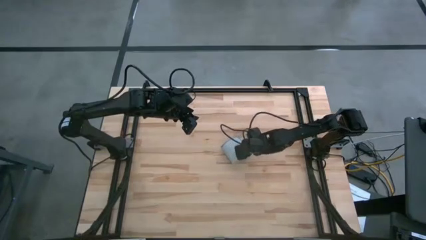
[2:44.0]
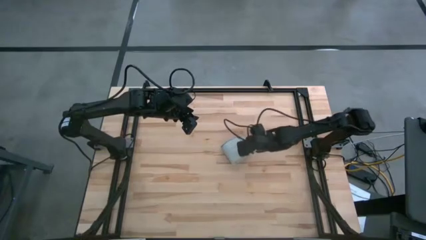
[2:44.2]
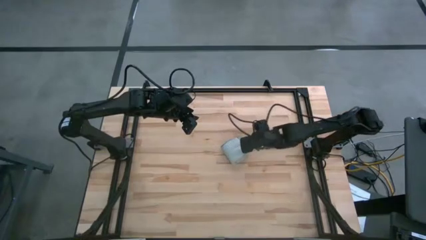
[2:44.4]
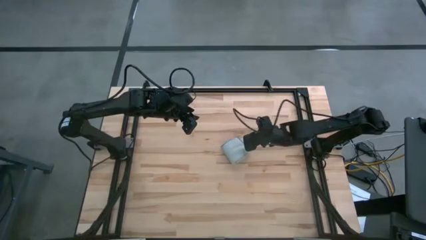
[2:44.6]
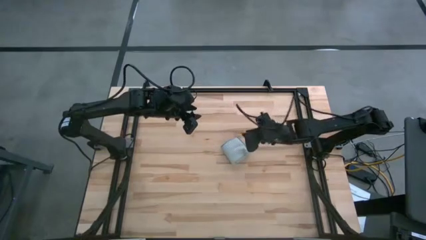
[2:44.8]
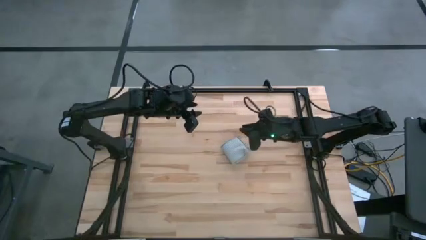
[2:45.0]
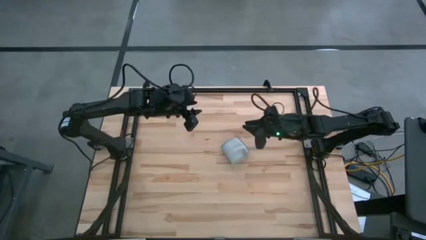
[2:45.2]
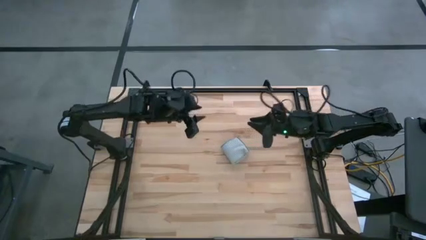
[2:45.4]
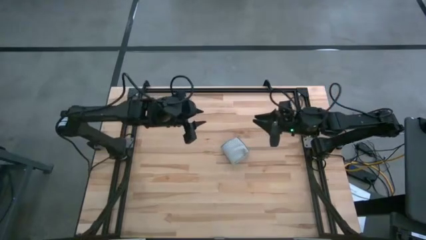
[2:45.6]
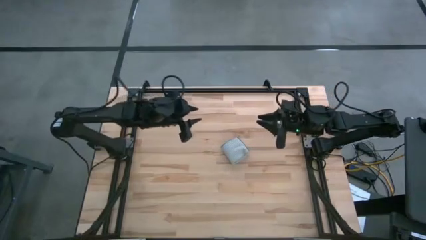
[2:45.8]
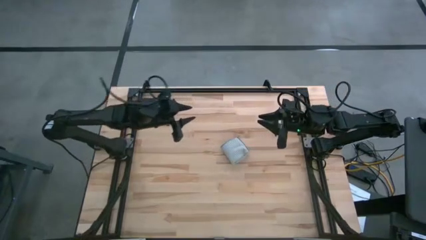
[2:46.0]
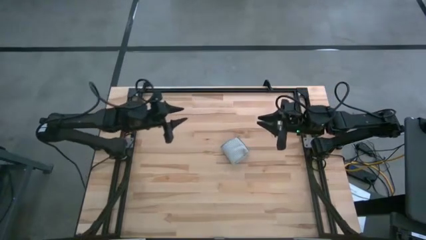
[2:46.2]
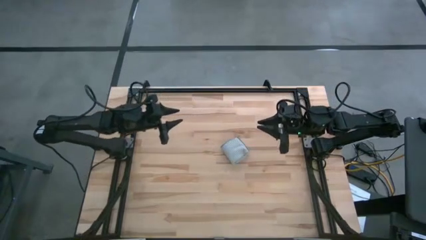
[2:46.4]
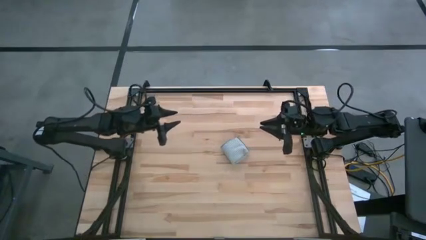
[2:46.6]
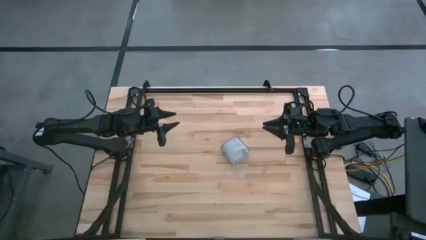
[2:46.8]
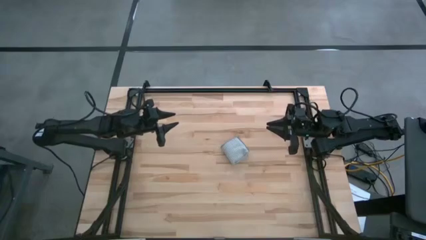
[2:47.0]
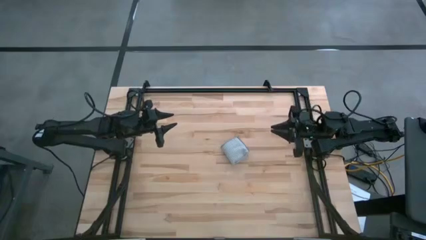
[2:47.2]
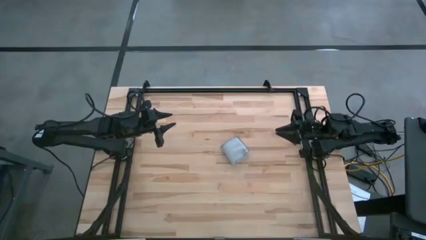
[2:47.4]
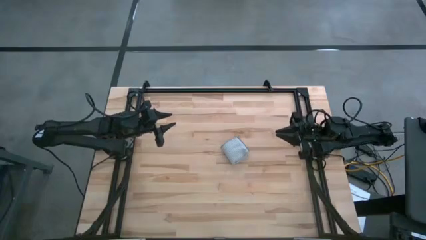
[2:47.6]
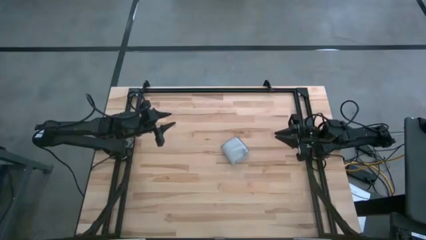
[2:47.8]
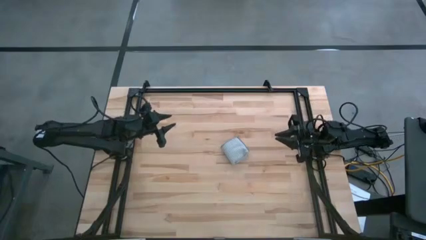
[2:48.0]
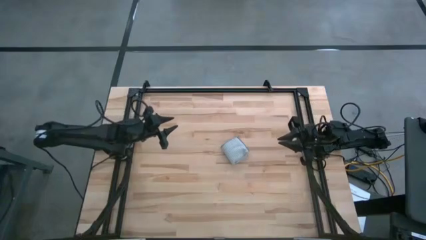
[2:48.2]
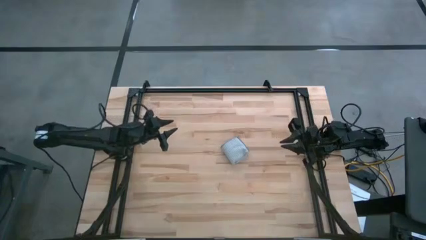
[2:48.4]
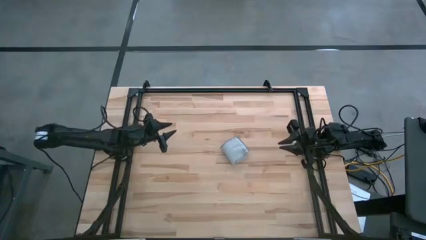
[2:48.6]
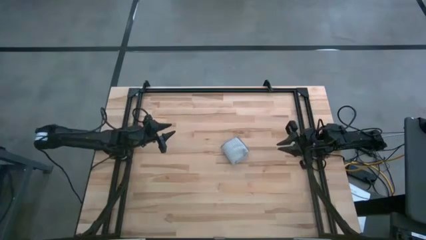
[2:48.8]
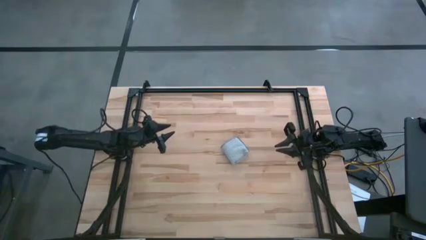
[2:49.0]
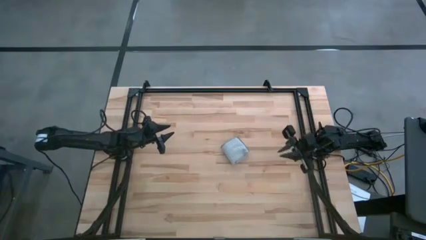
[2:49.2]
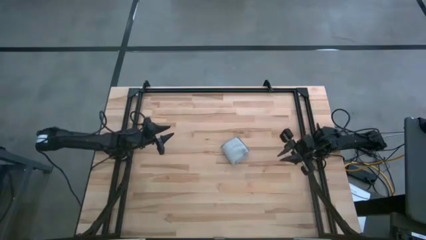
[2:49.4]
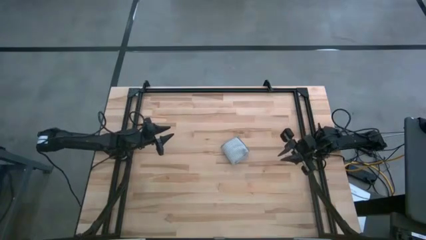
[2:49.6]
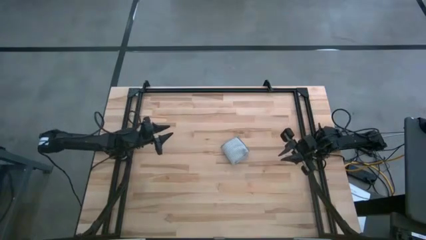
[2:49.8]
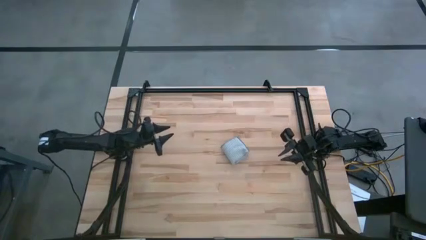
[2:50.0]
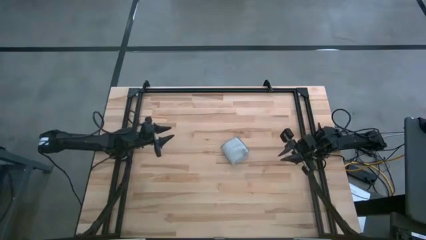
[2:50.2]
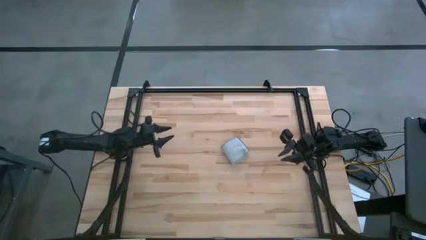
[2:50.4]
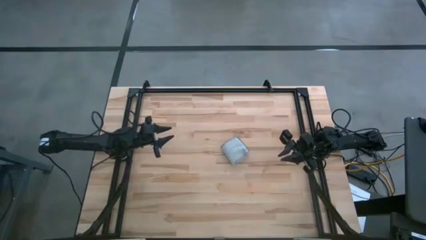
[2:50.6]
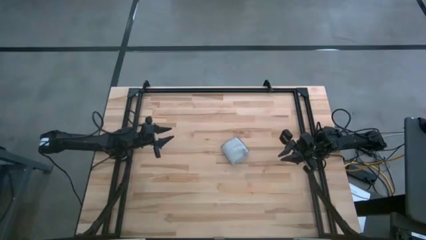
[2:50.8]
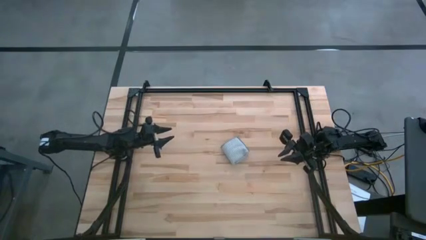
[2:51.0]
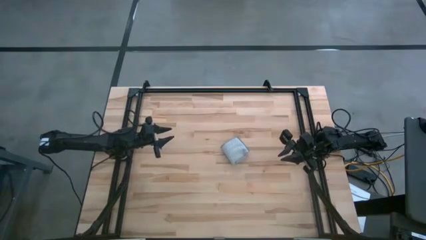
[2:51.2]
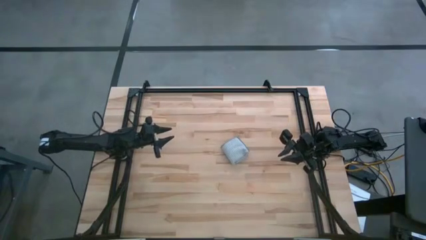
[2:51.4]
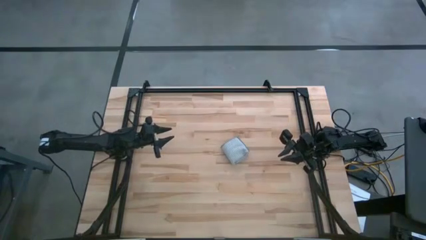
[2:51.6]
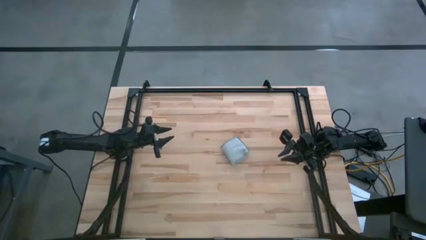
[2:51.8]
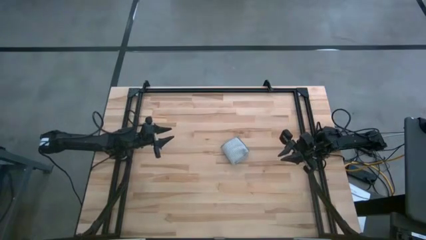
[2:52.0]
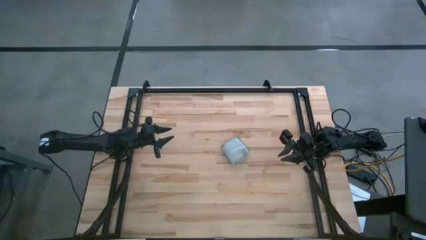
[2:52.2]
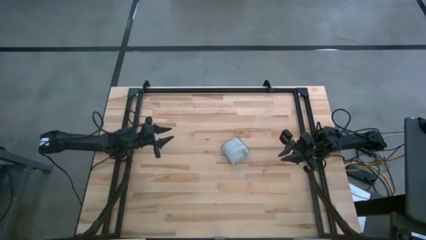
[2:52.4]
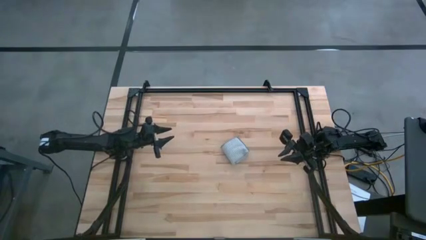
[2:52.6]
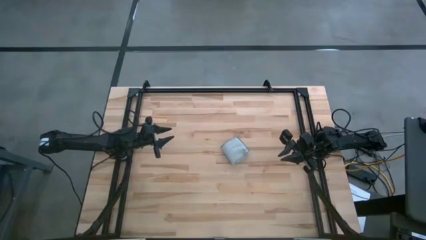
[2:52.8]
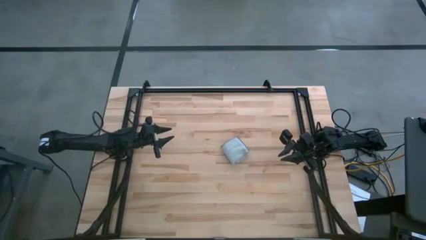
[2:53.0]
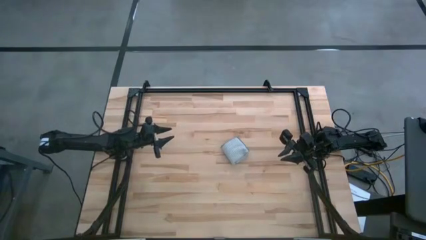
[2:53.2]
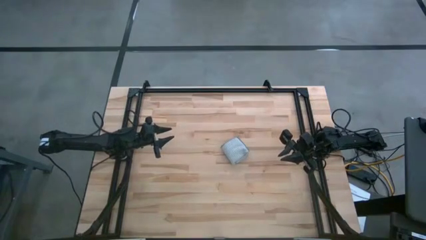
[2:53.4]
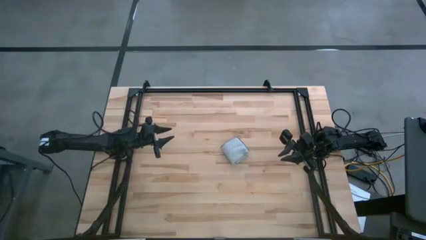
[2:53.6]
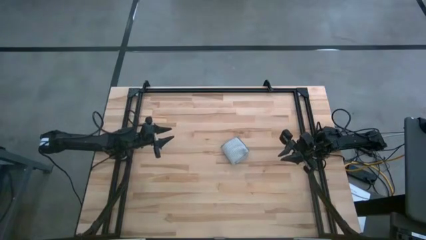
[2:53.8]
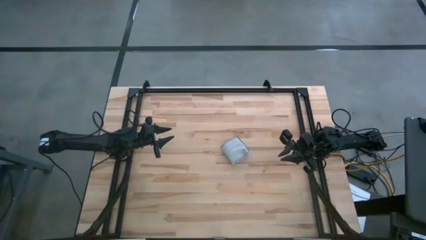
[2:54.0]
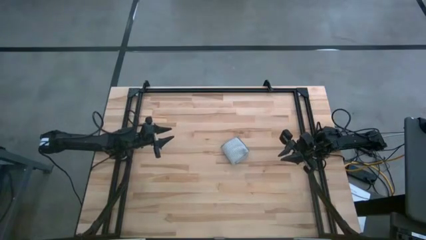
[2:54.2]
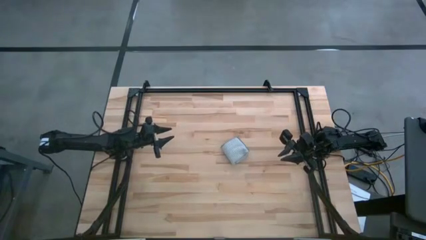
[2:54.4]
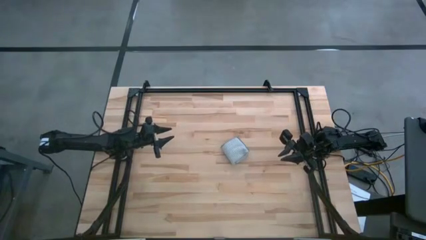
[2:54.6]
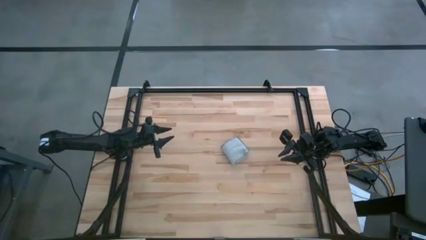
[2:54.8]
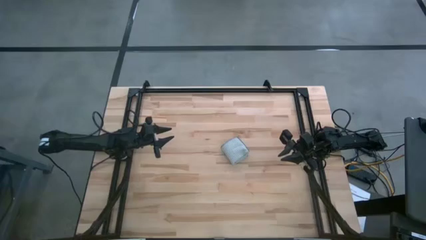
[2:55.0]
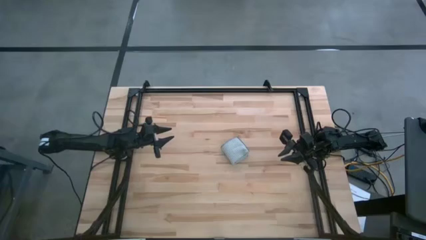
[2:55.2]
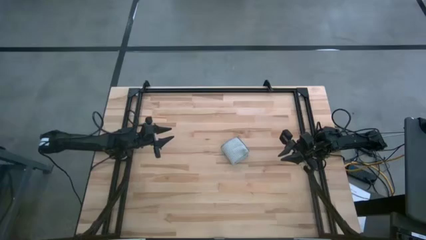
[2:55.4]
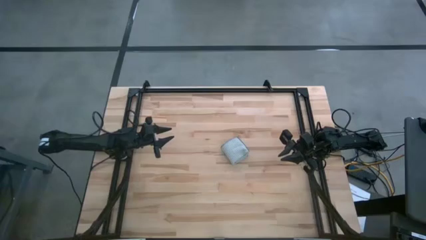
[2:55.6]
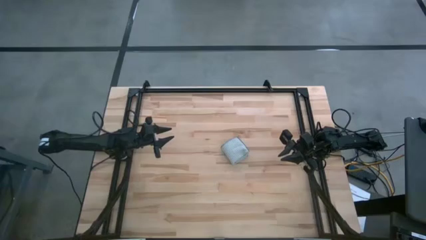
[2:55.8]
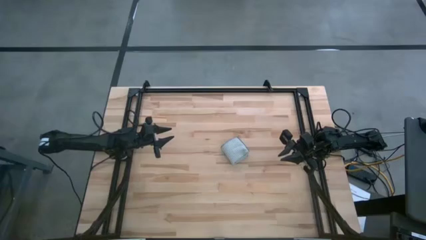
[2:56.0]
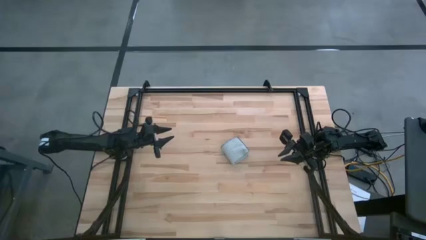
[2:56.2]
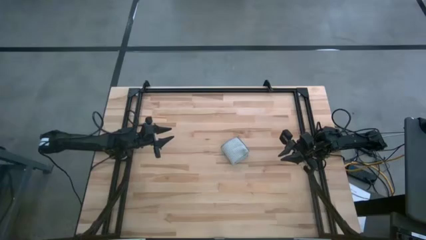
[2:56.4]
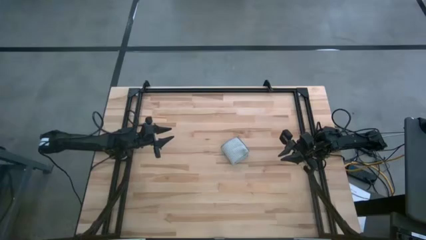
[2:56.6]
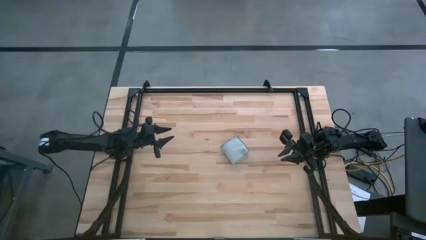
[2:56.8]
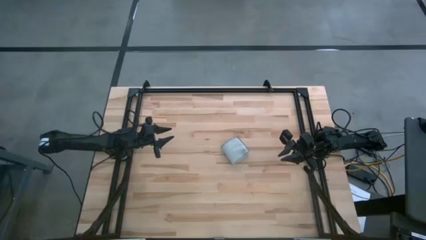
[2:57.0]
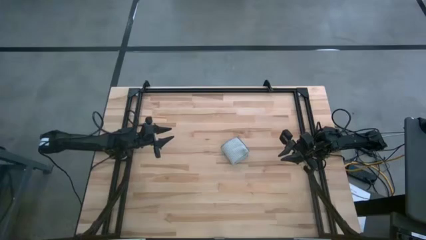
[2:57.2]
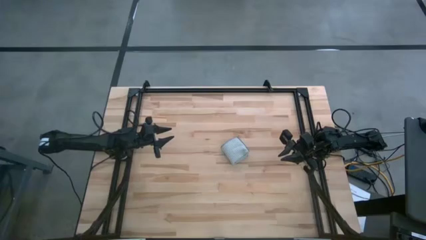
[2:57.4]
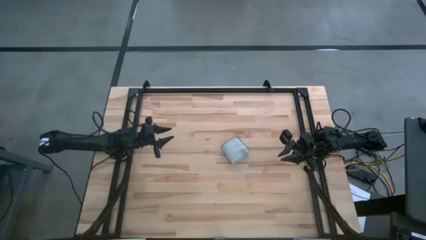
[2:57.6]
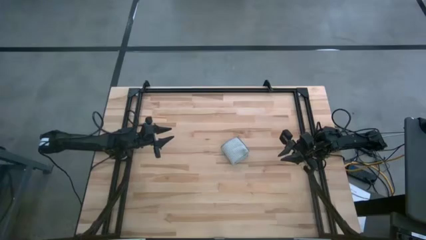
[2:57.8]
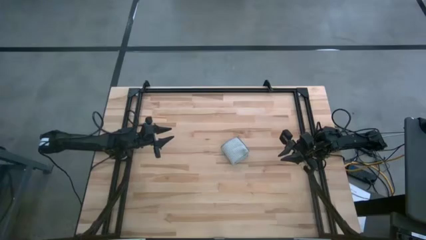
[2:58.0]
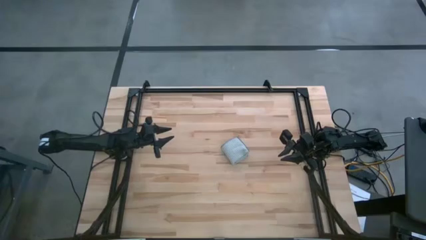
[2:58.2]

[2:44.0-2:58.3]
Task: Fold microfiber towels
Return to Home Position

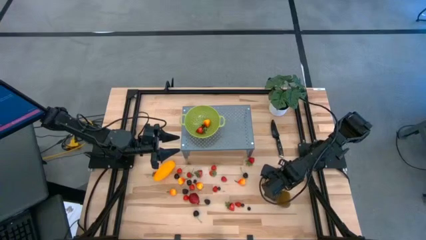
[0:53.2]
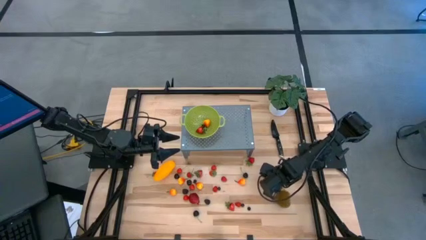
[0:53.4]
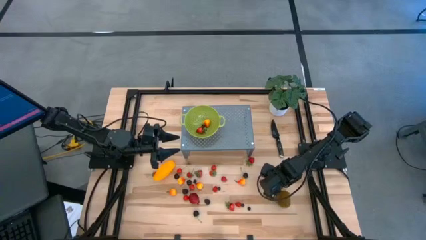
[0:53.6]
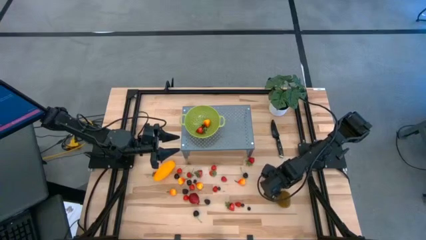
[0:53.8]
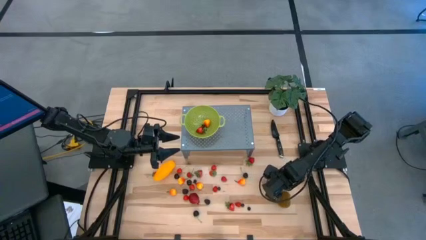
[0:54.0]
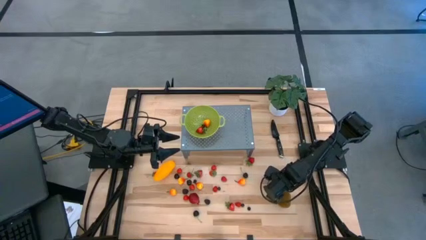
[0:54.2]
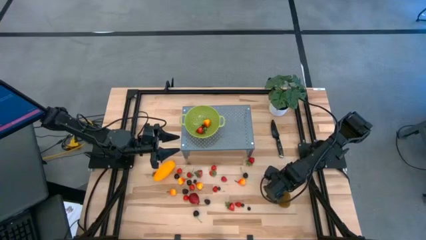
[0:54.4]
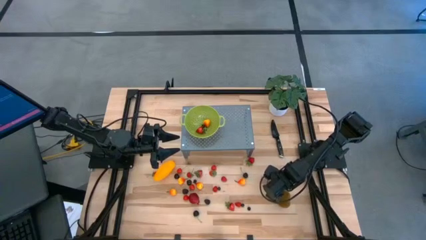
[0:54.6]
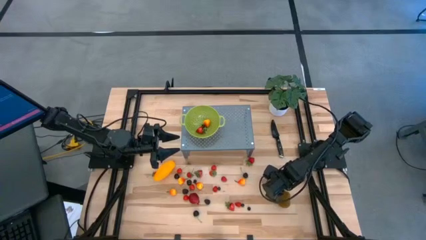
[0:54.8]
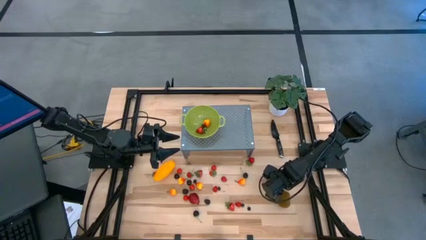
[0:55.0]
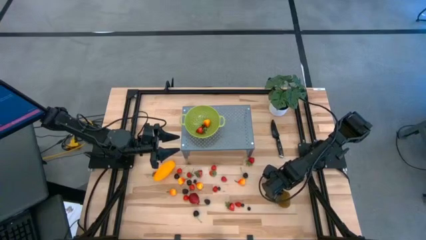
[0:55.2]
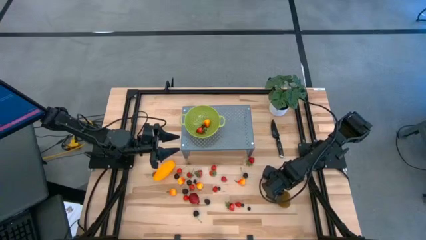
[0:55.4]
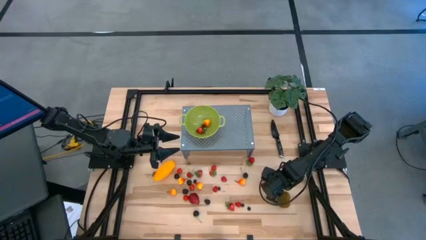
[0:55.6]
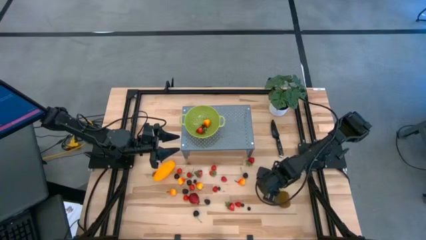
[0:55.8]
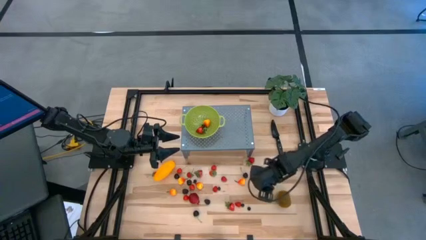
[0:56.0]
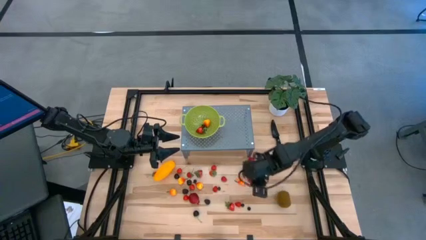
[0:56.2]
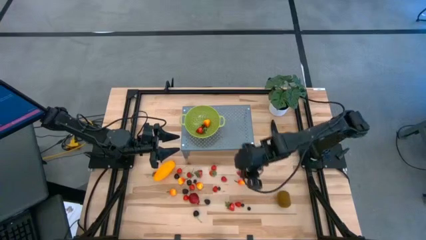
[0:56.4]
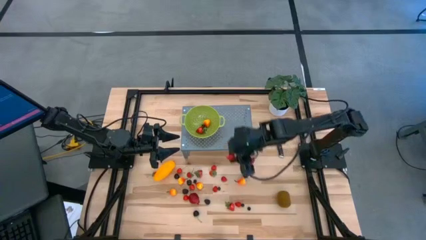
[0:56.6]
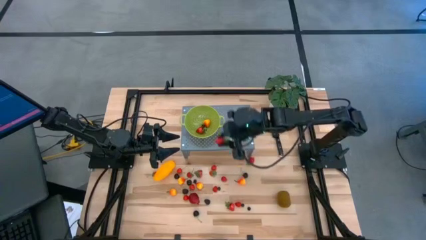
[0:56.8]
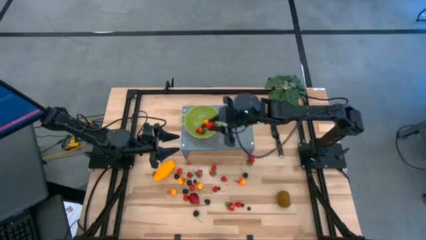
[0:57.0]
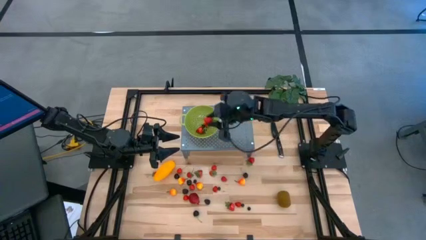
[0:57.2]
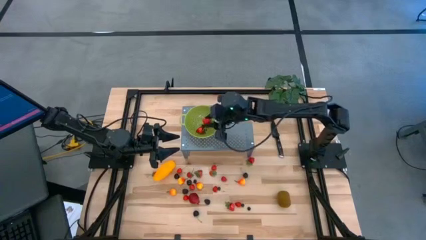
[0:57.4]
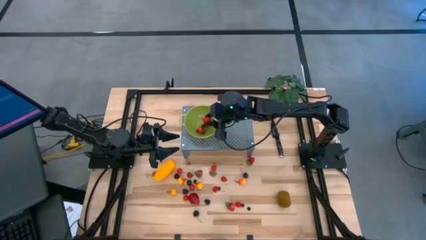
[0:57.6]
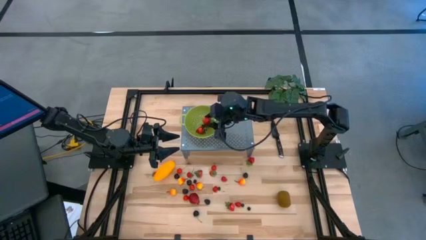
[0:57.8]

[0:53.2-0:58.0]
Task: Pick & Place Fruit
Put the strawberry into the green strainer bowl on the shelf
